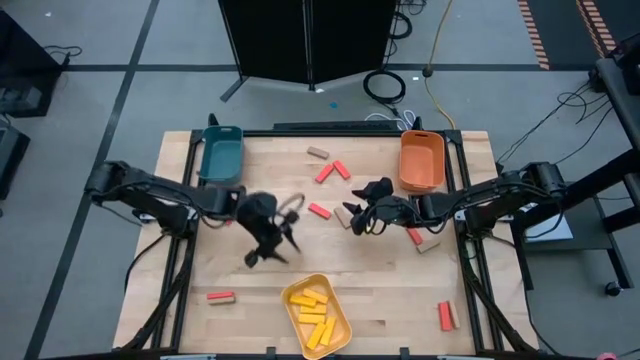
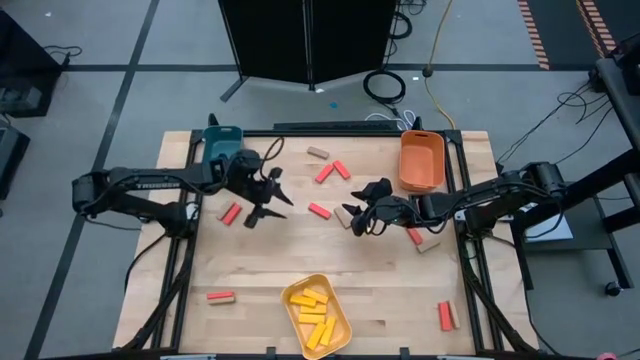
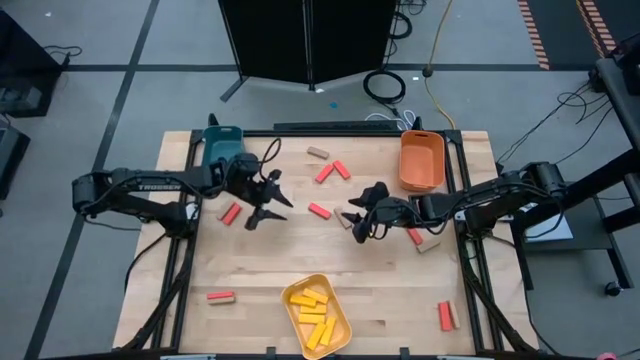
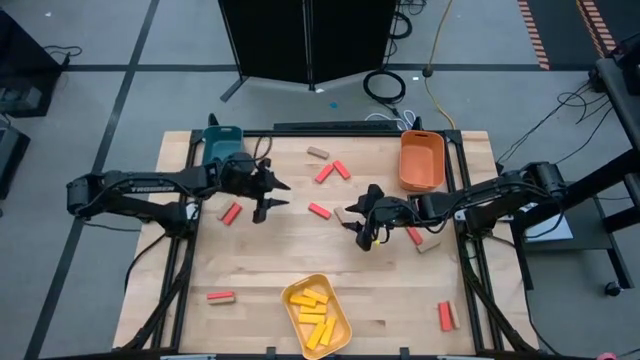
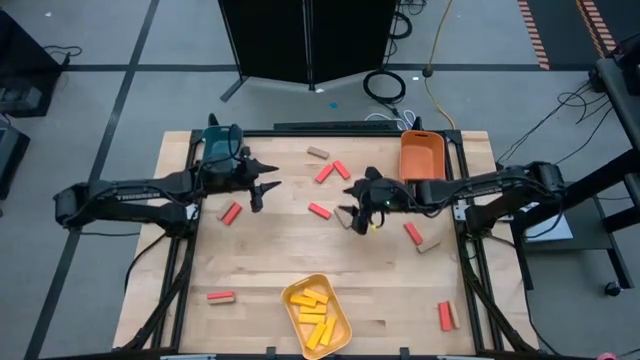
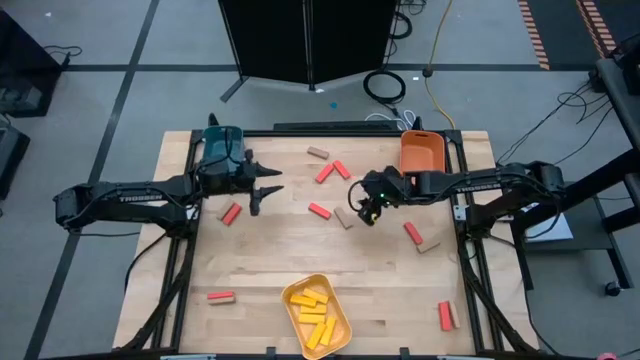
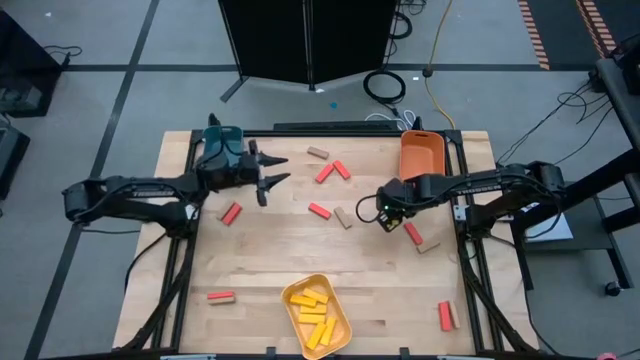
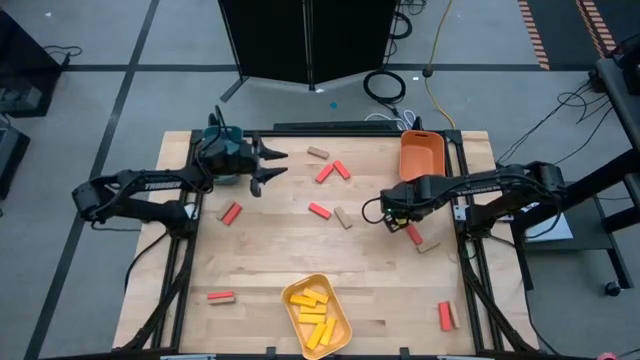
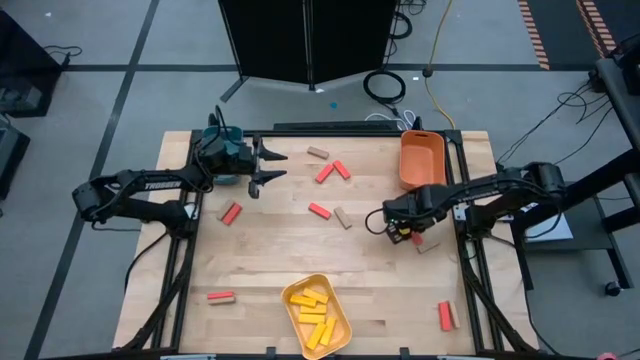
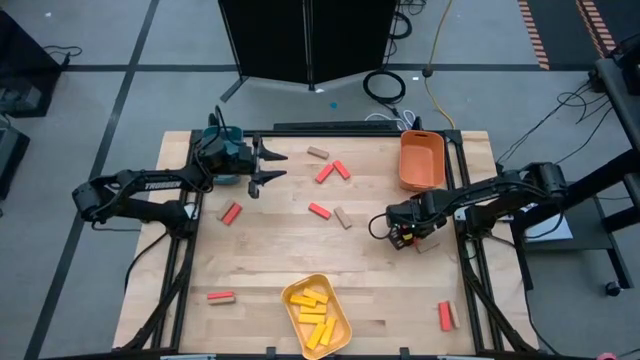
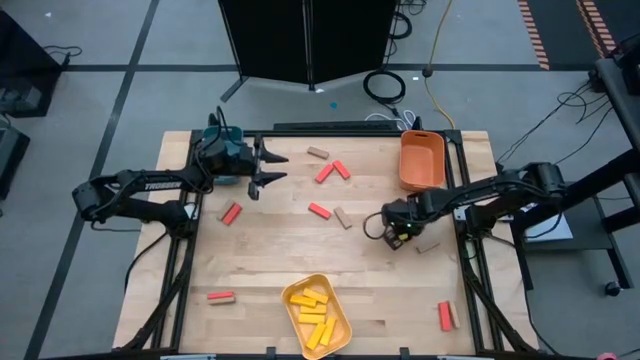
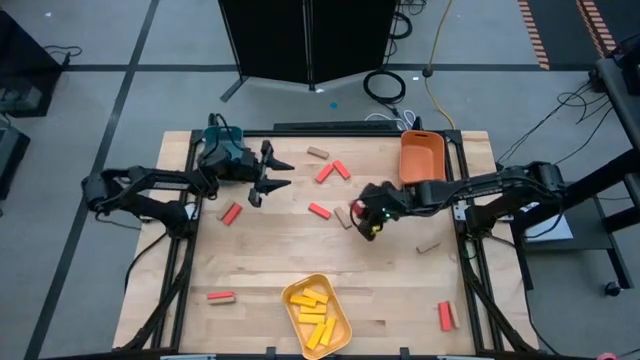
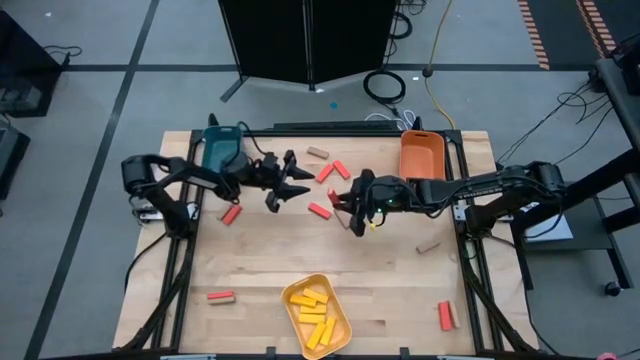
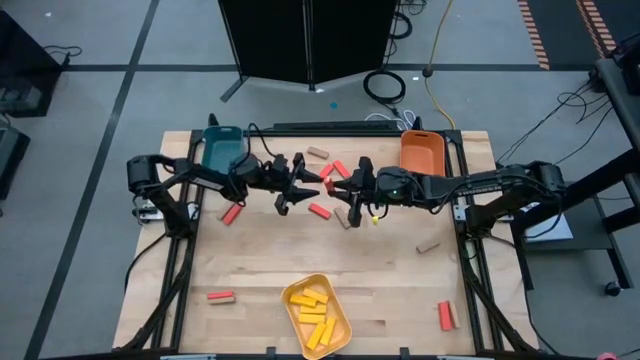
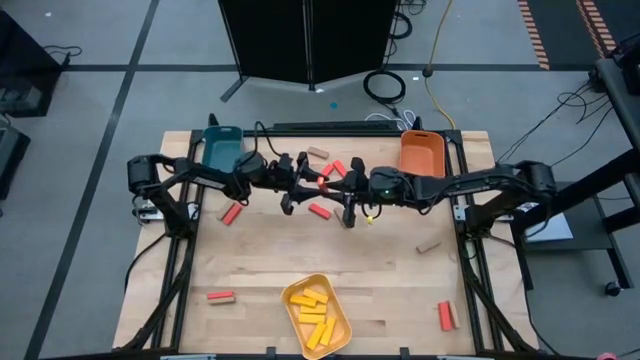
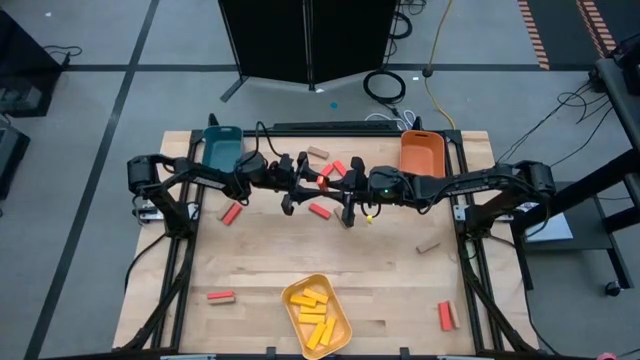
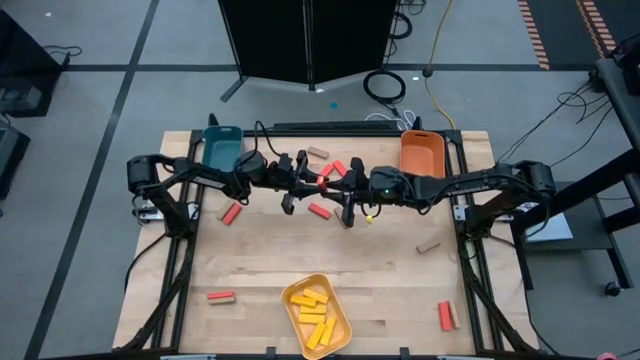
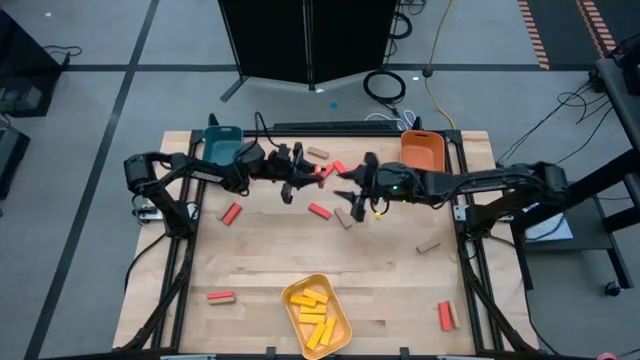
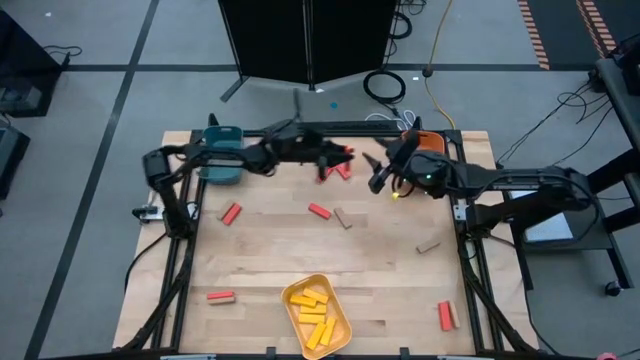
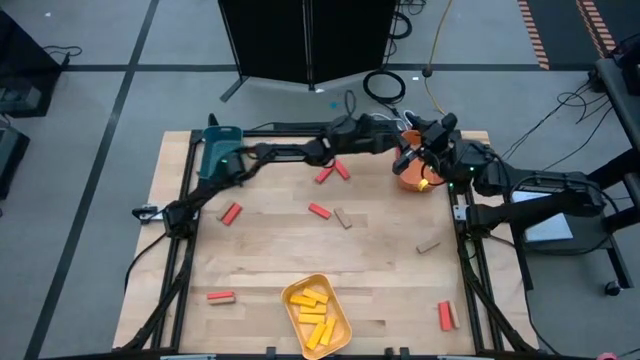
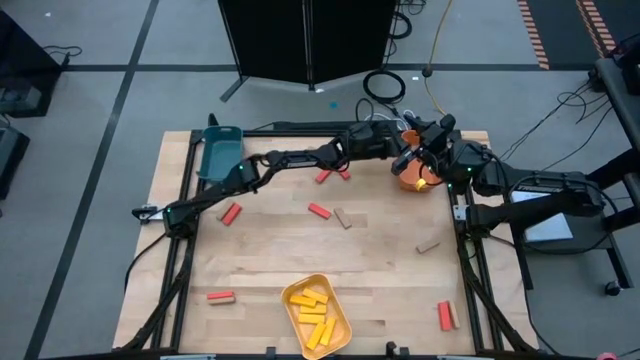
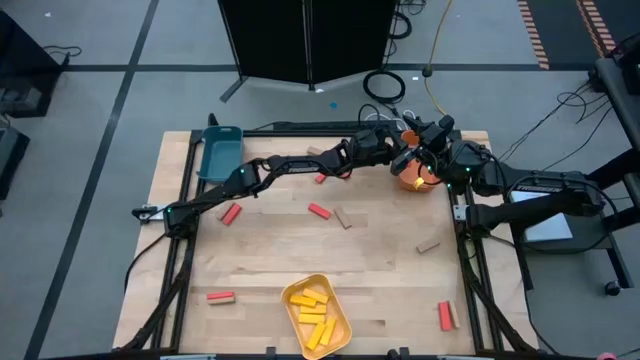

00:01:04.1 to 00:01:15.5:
Task: Sort blocks
Put the red block into the orange bin

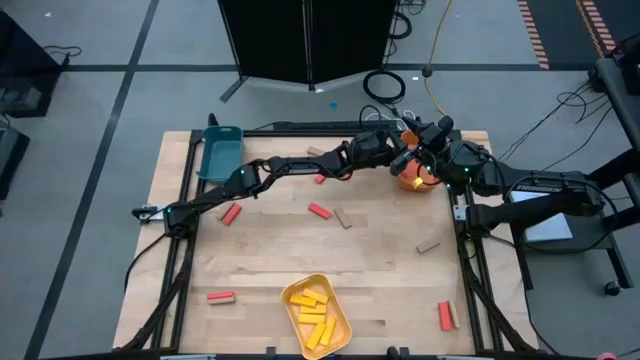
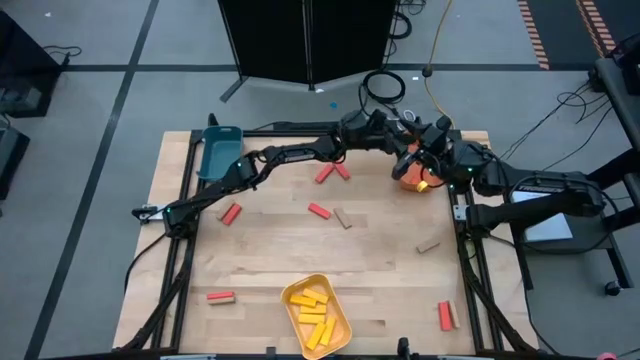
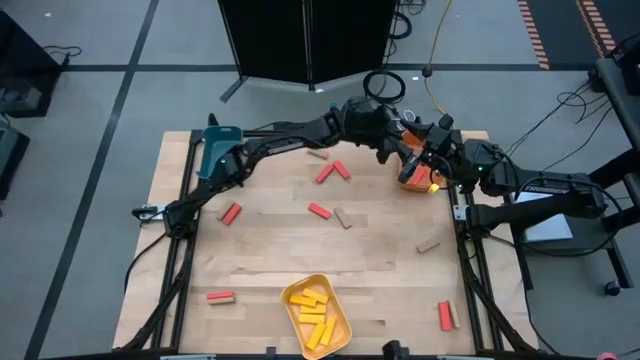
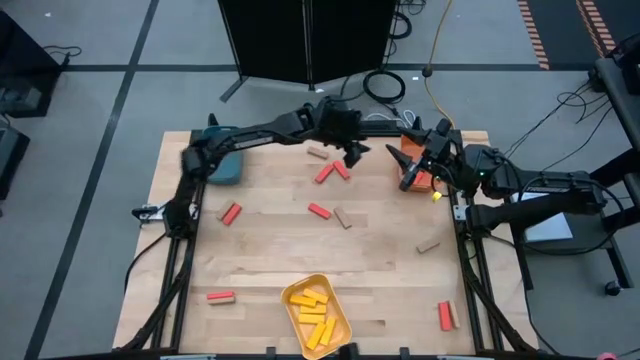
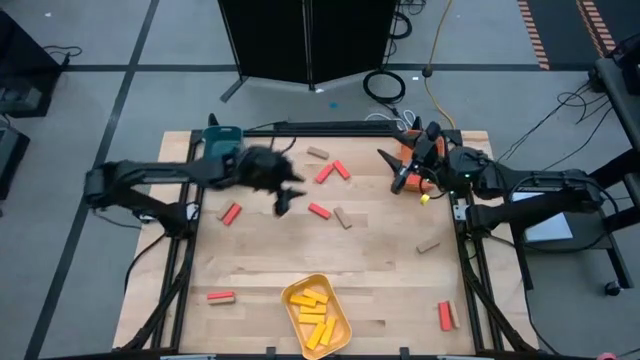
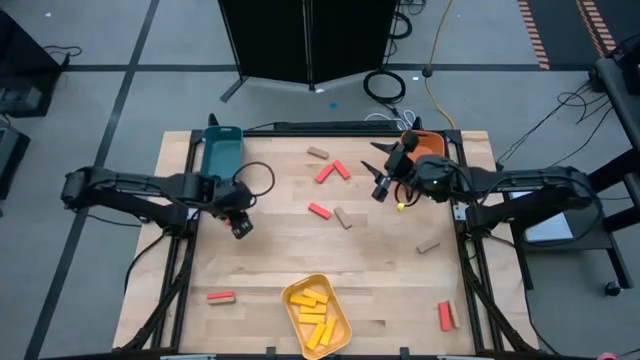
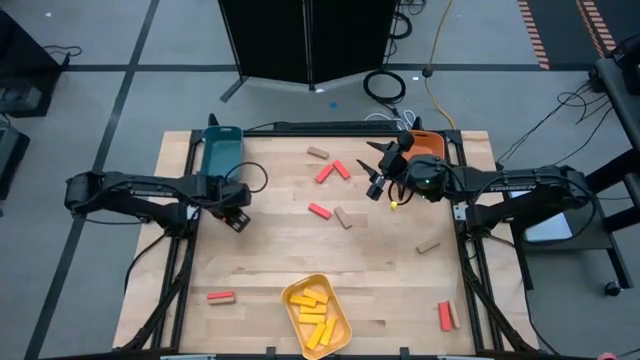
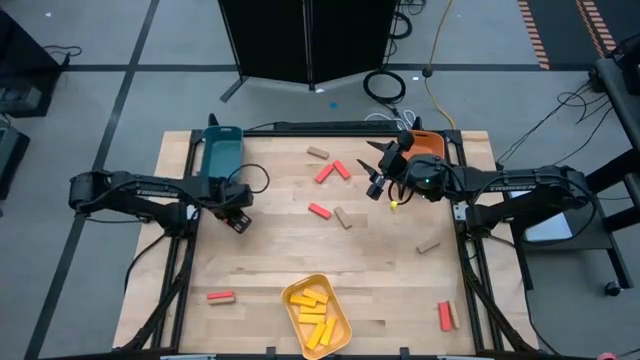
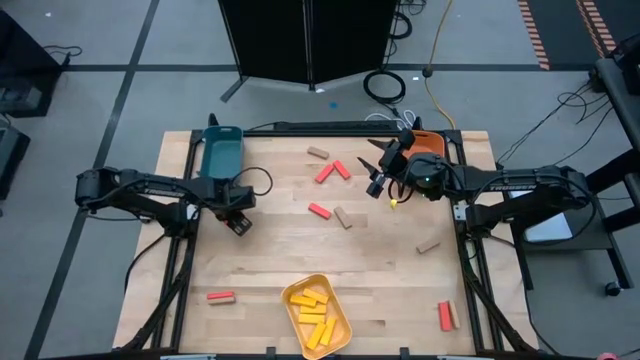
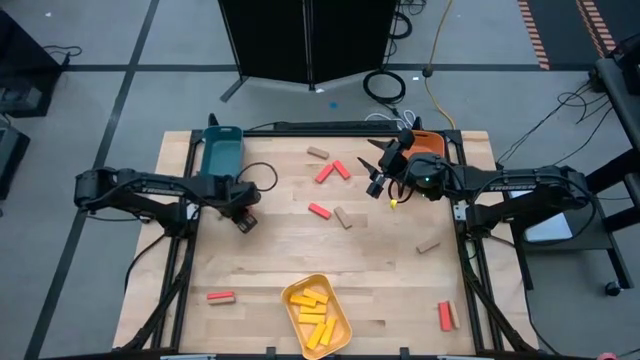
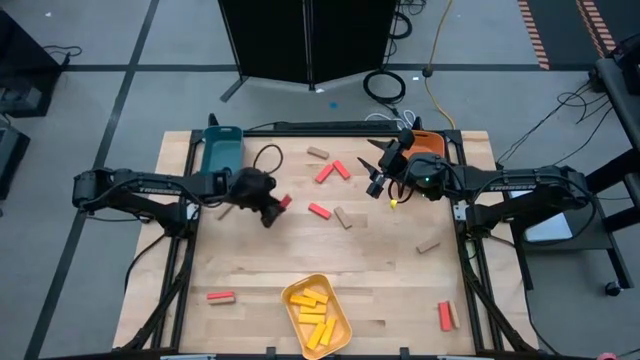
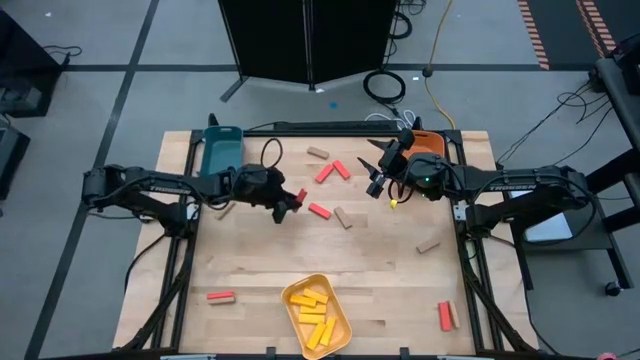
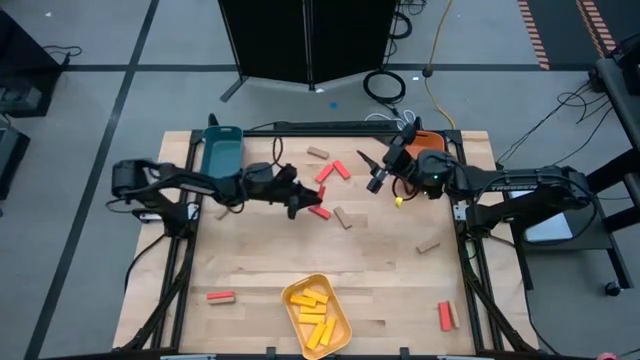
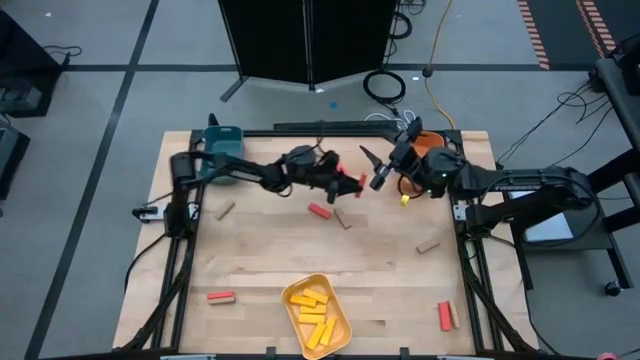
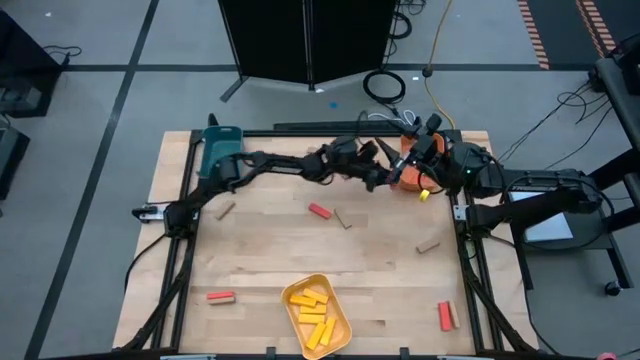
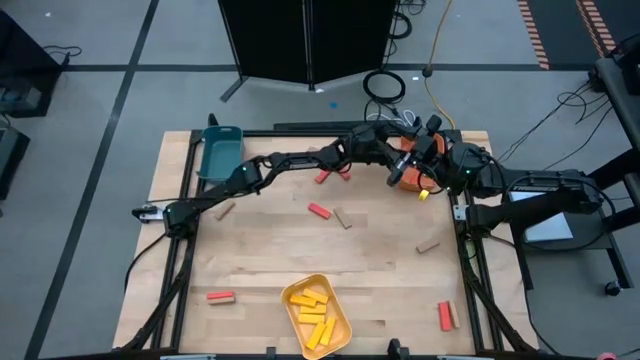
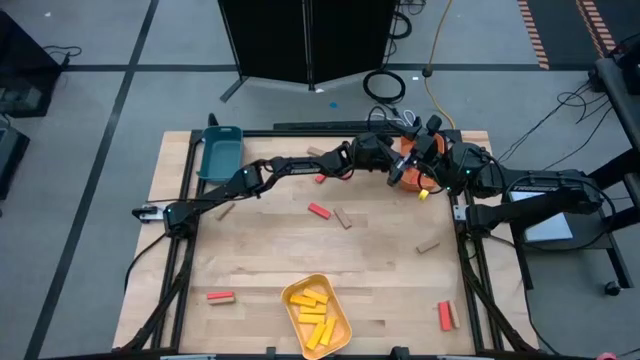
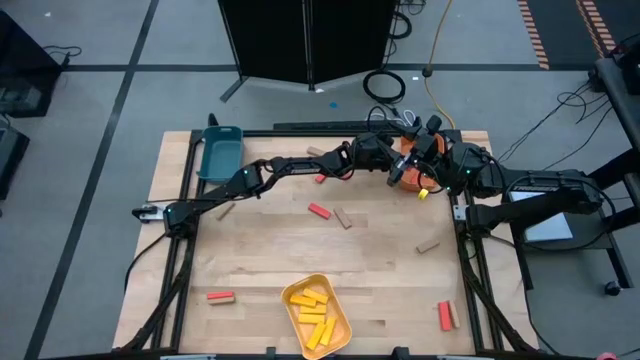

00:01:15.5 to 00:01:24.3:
Put the red block into the orange bin

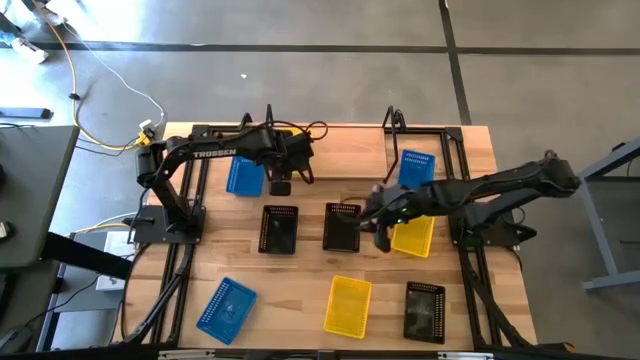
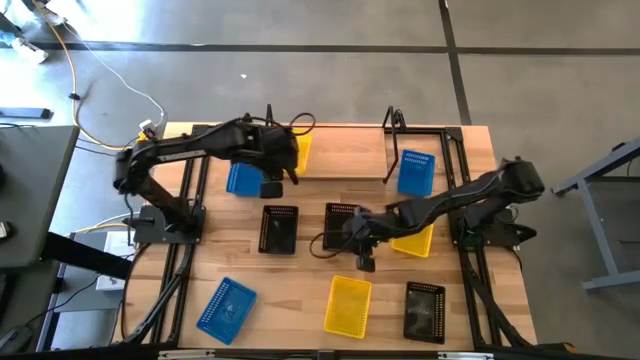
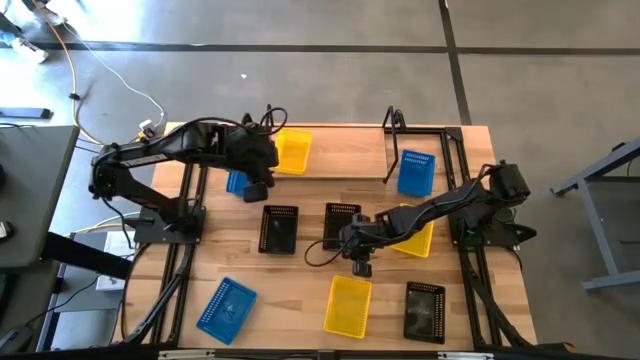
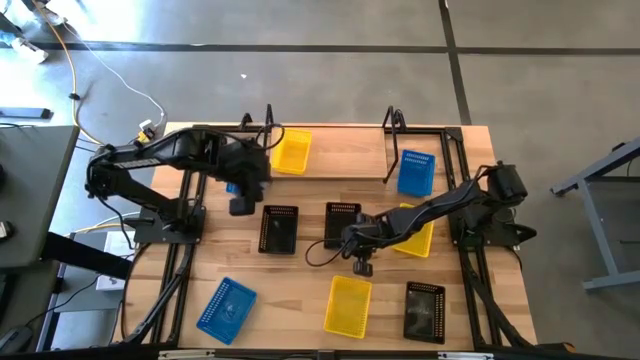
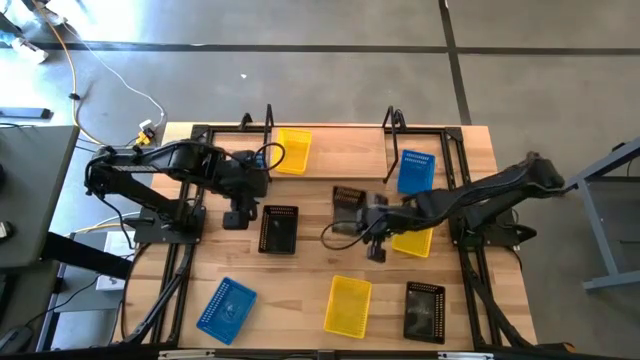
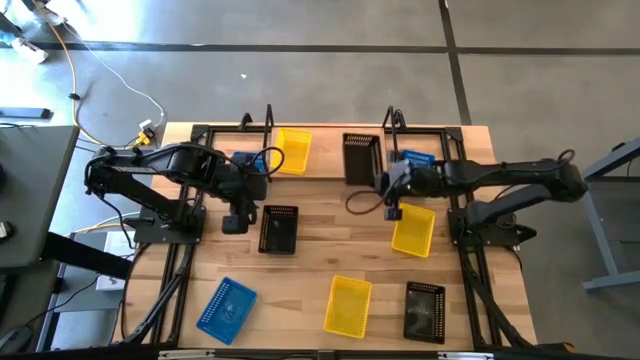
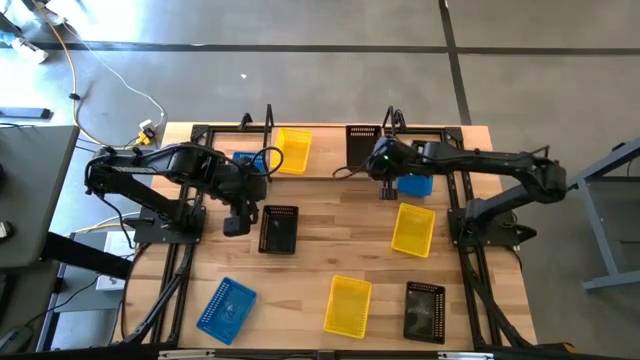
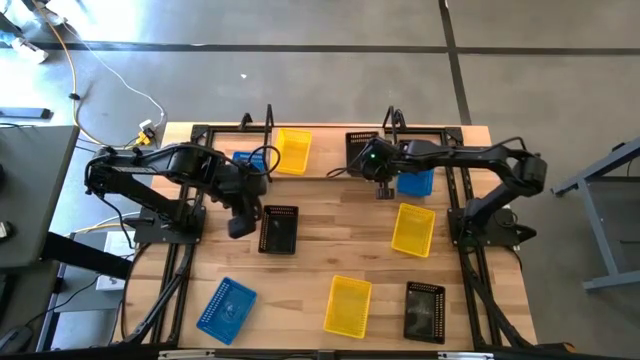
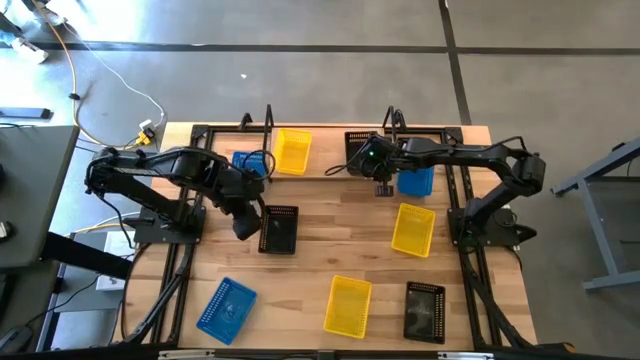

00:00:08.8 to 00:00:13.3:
Task: Stack baskets on shelf by color
Put the top right black basket on the shelf
